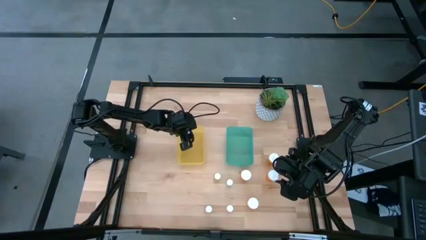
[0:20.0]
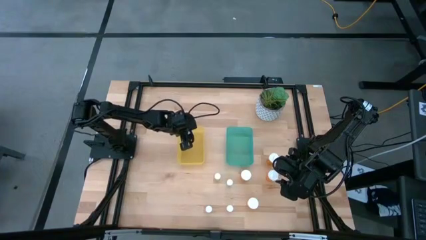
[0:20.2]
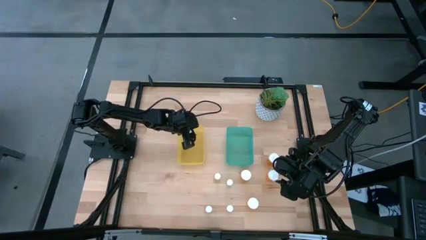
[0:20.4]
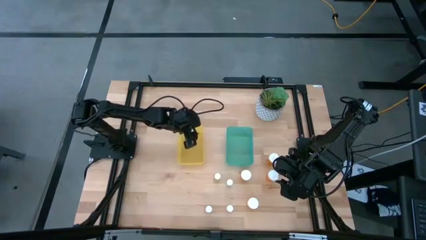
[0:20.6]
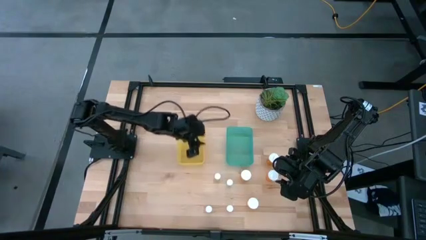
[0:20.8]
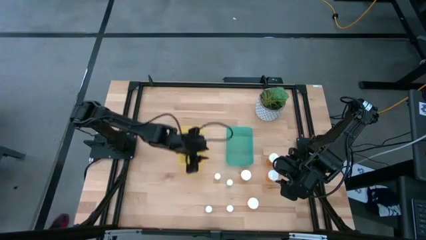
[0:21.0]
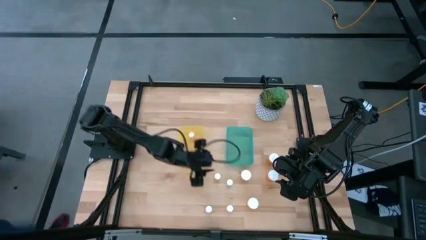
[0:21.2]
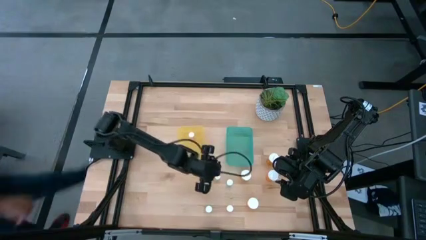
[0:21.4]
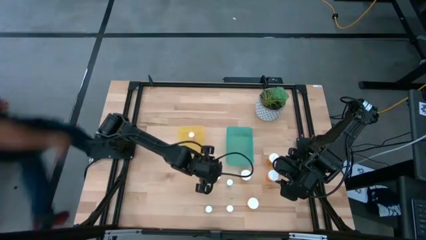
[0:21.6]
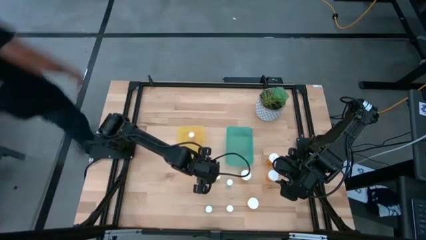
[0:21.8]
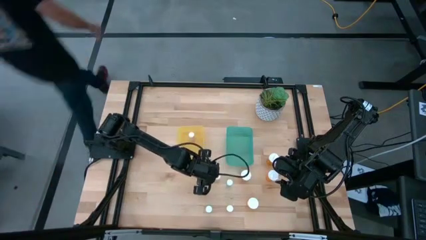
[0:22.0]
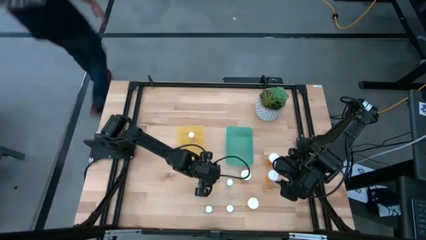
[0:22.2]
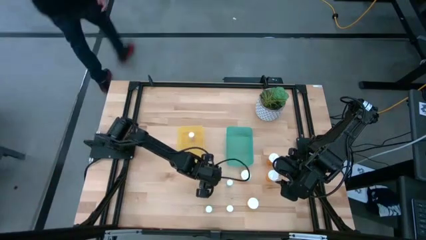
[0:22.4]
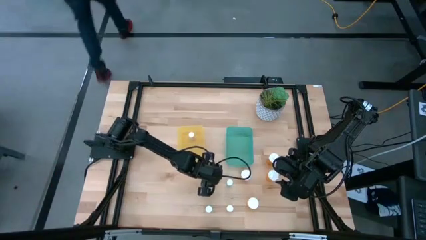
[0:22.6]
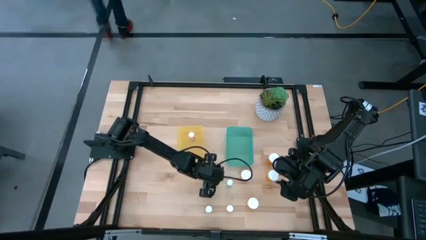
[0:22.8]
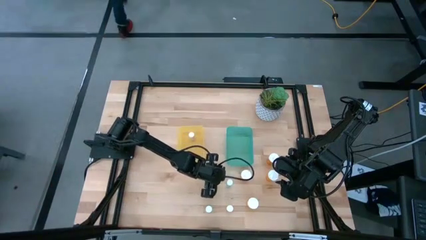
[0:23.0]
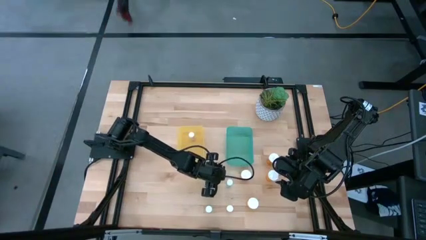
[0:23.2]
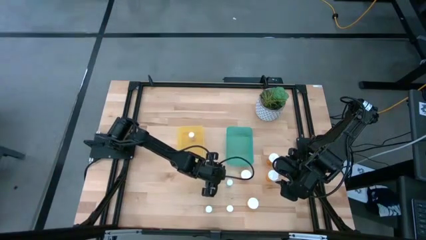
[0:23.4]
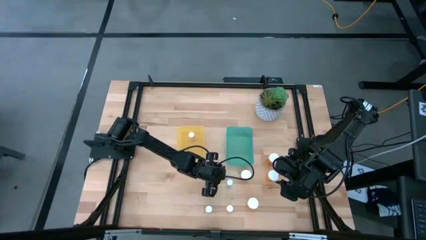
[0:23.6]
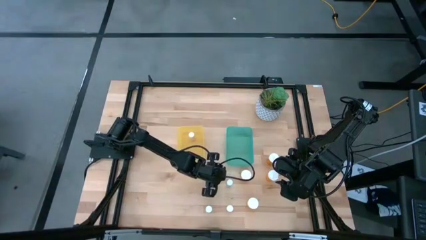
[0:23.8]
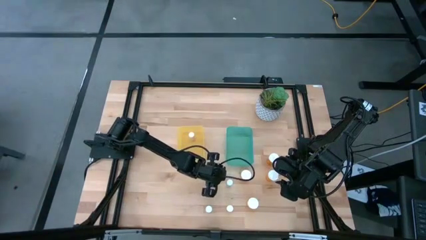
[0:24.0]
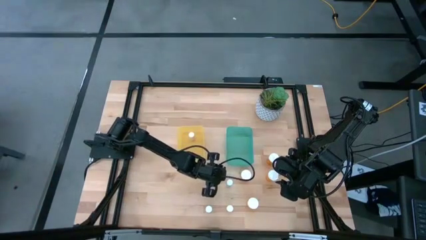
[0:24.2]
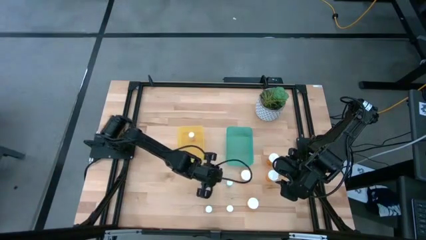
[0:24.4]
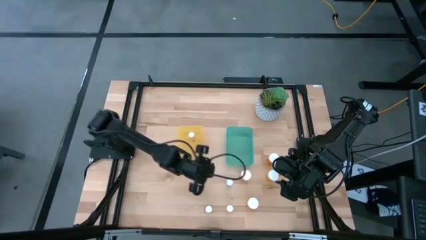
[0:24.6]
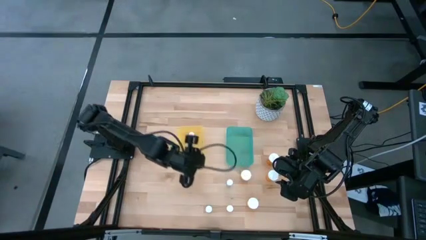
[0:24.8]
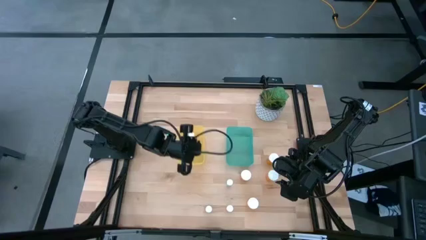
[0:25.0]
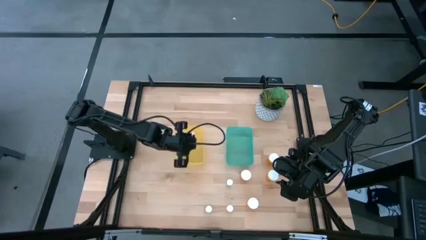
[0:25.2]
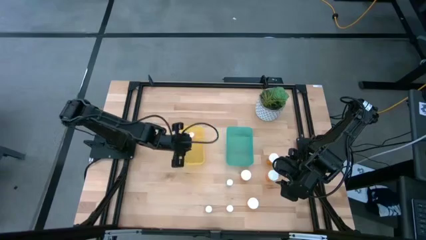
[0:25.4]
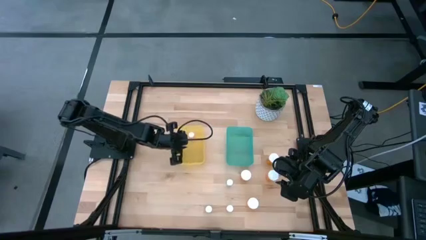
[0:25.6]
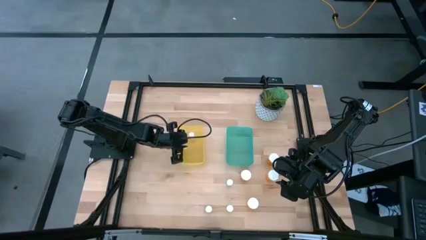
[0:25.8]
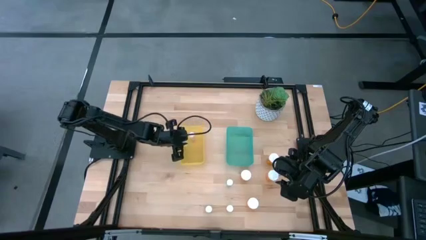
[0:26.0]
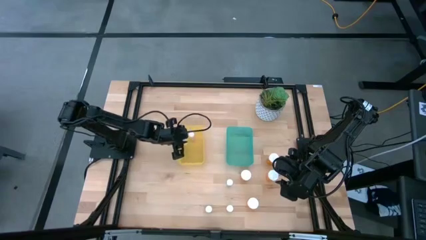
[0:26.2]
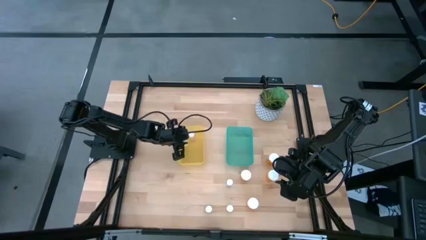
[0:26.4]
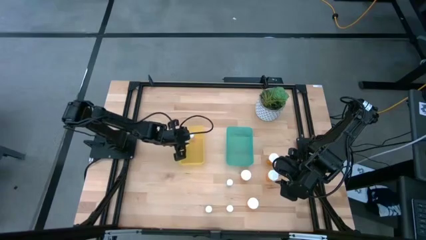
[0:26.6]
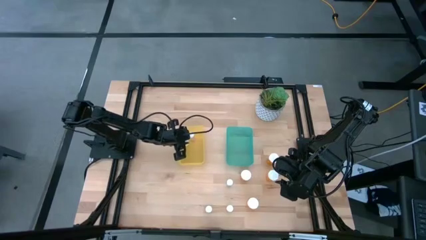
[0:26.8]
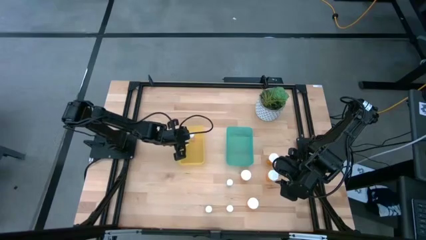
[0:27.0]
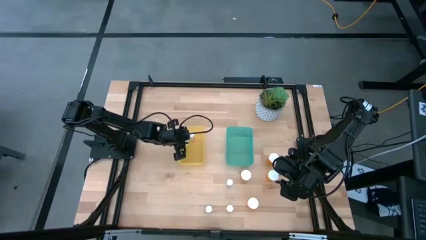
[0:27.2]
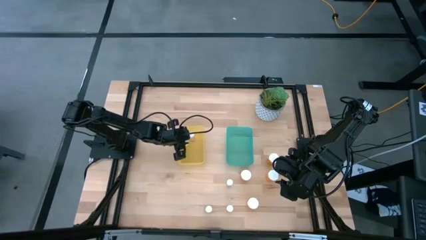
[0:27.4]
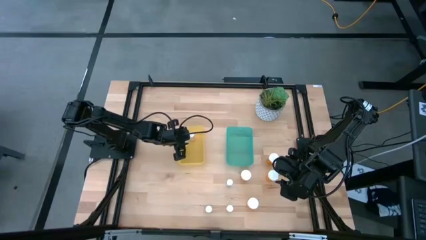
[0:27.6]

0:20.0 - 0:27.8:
Task: Pick and place medicine bottles into bin by pill shape (circle, oval)
Put the top small yellow pill bottle into the yellow bin

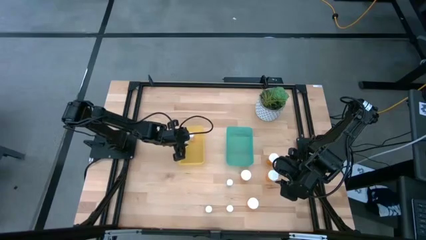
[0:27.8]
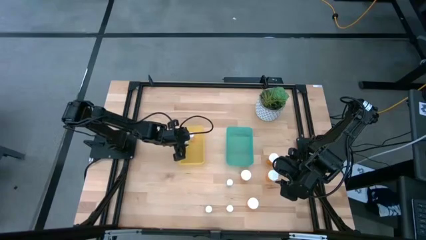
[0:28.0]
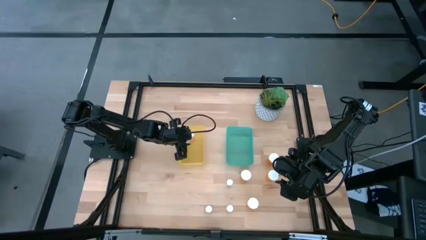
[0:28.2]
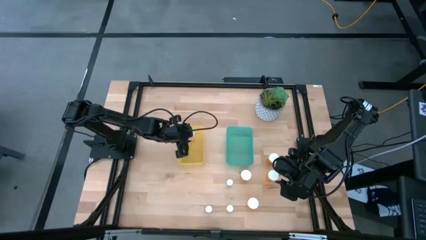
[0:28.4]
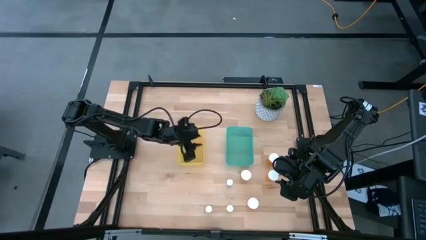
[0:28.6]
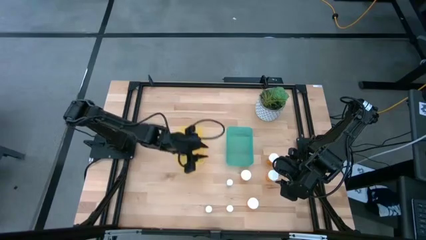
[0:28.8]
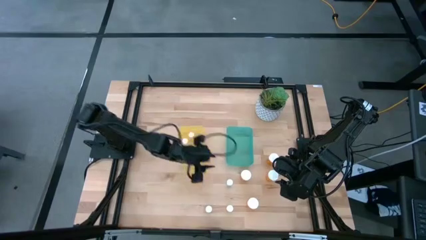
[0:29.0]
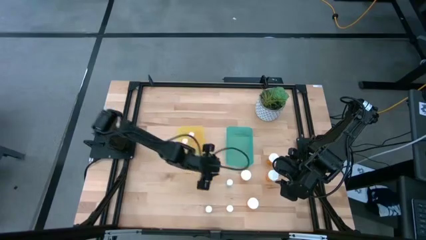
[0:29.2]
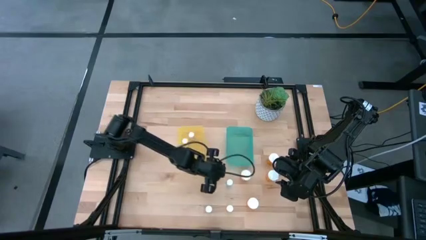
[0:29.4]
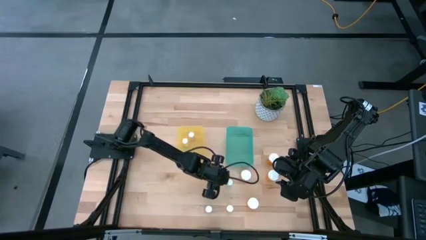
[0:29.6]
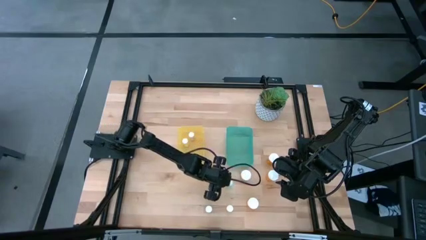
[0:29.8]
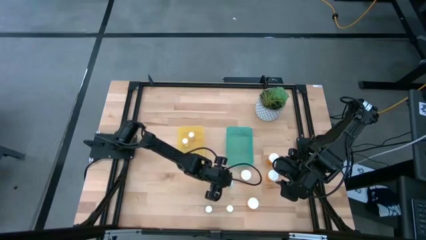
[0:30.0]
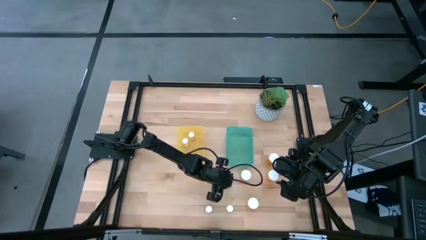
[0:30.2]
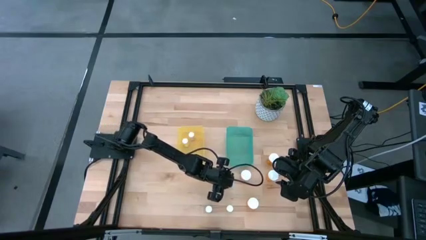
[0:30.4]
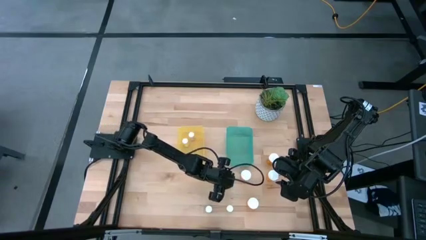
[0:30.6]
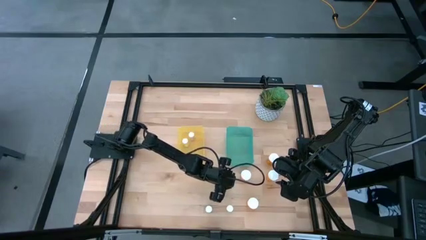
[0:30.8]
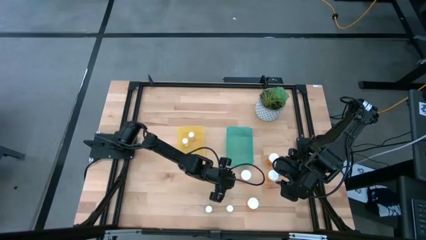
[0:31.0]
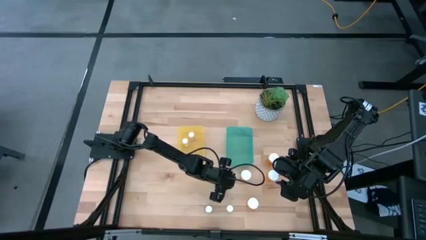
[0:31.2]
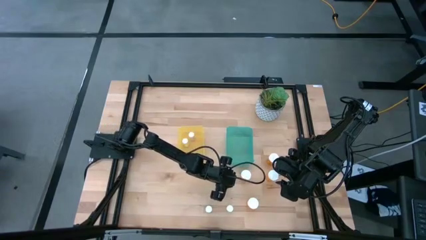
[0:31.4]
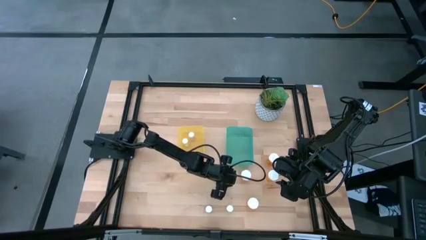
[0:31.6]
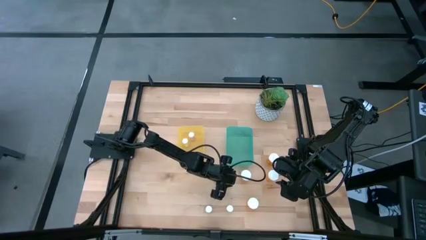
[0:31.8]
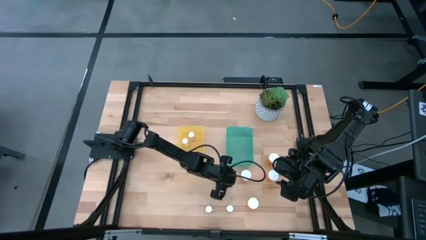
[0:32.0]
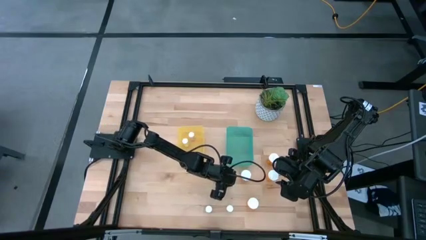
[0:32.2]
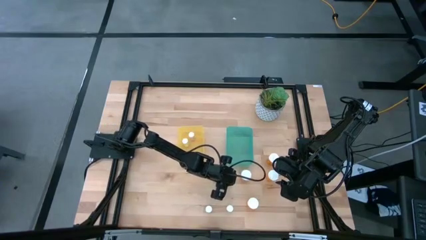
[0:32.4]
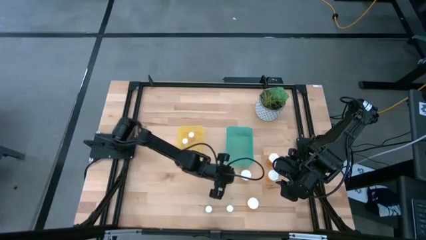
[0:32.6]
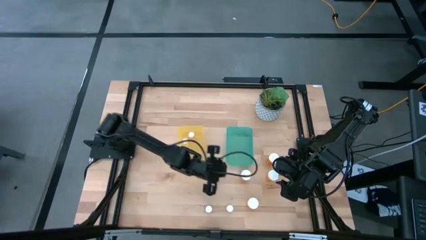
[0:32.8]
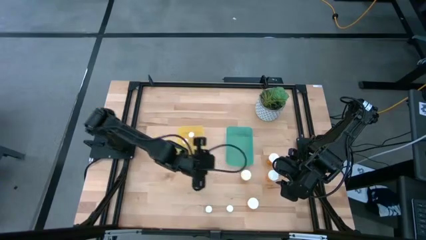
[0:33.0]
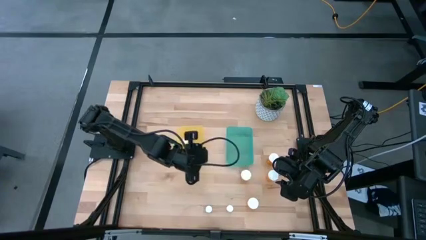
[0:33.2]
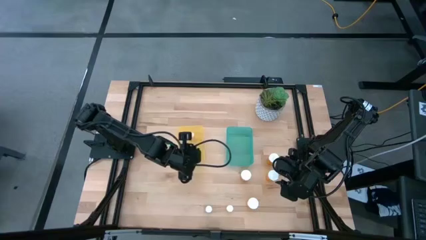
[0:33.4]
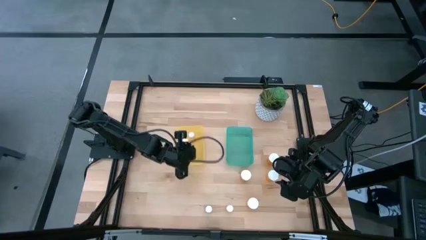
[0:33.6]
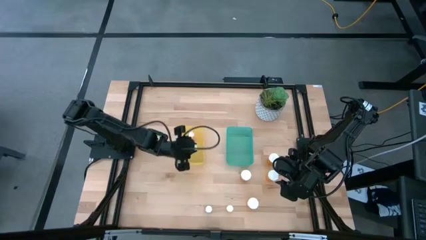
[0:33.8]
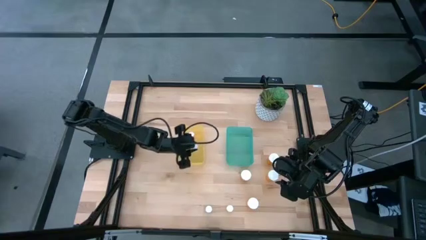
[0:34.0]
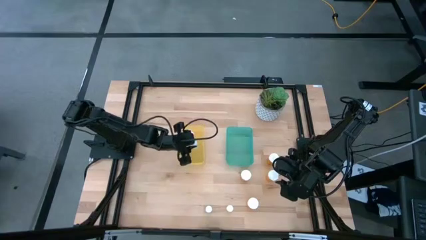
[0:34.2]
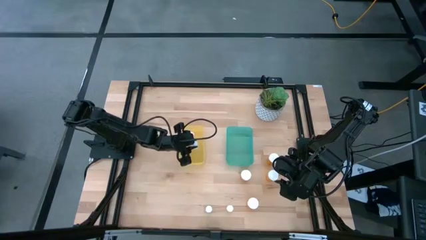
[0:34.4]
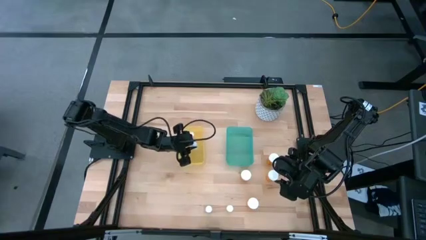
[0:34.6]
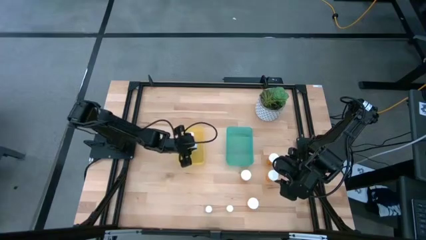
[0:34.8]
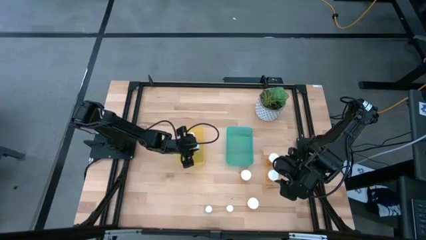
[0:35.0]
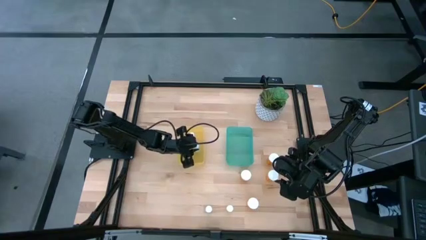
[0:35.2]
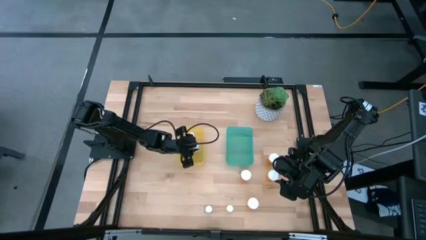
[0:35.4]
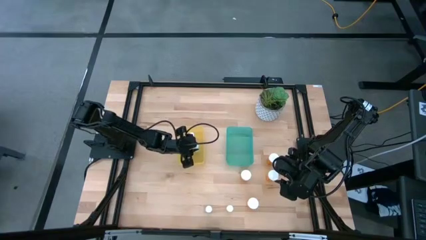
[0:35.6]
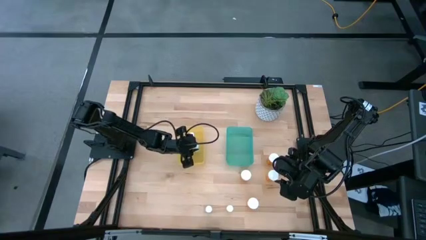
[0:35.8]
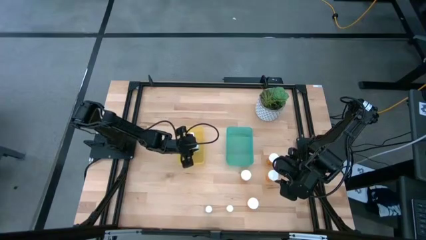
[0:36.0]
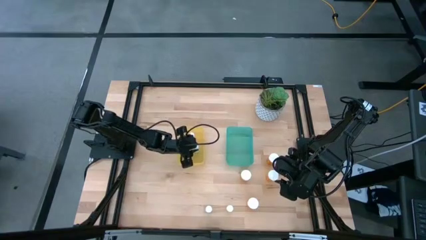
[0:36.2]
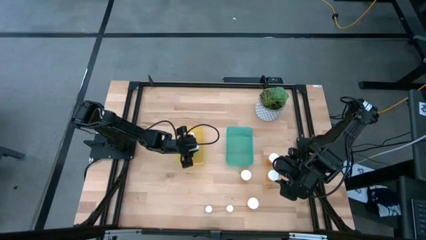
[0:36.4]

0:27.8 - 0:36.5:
Put the top small blue pill bottle into the yellow bin
